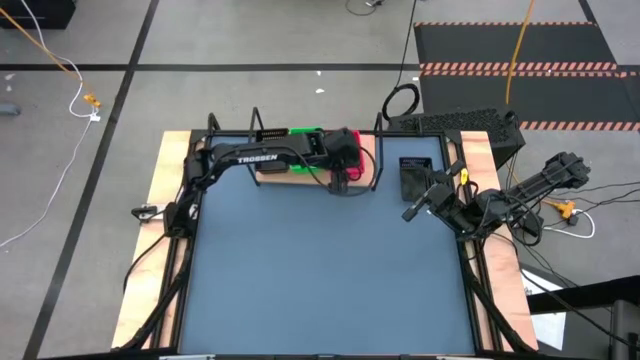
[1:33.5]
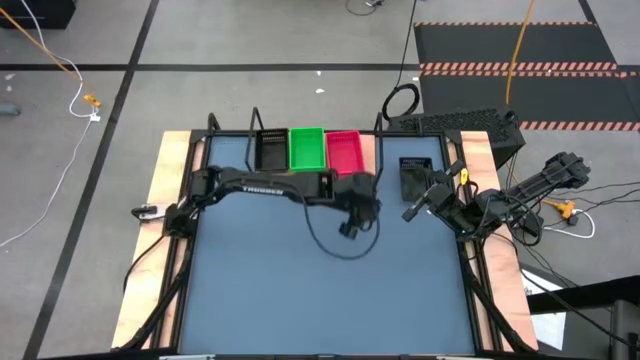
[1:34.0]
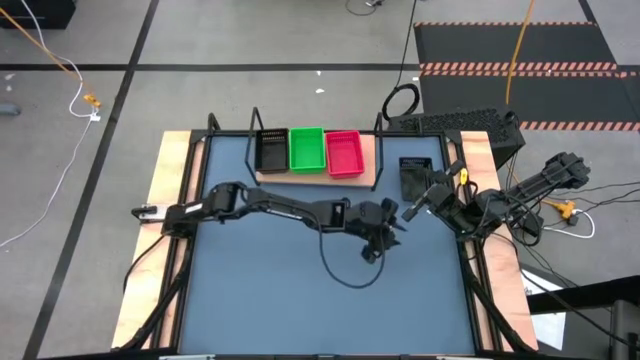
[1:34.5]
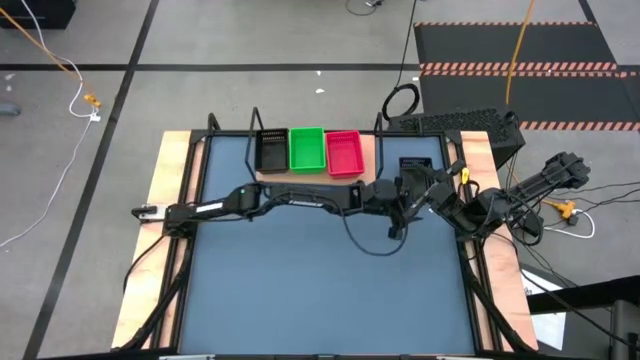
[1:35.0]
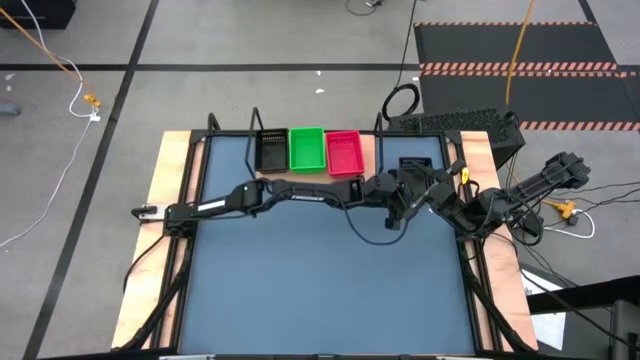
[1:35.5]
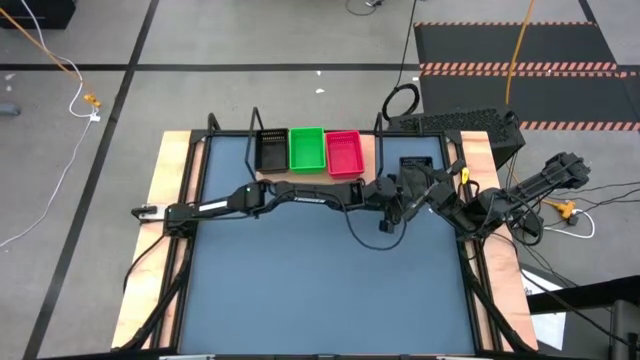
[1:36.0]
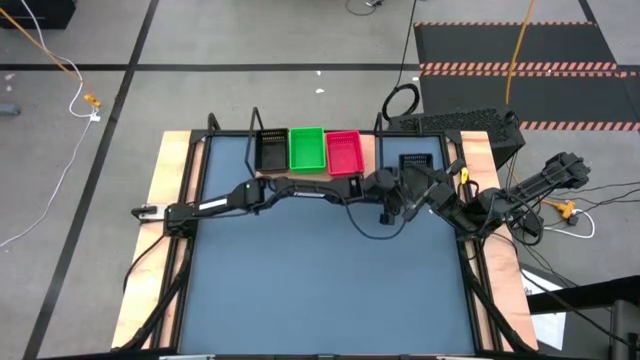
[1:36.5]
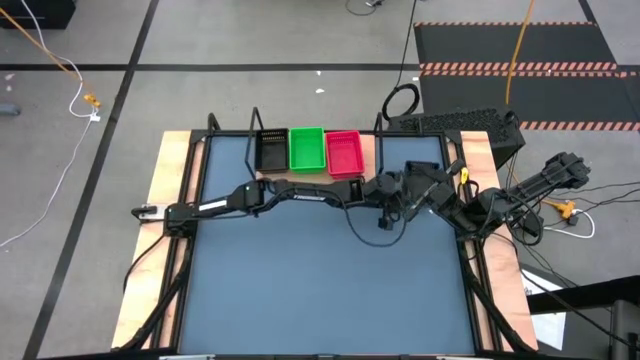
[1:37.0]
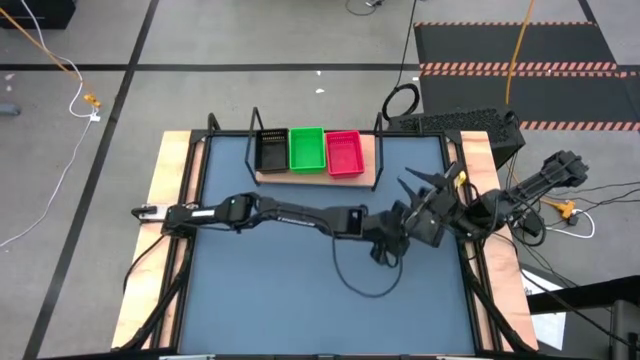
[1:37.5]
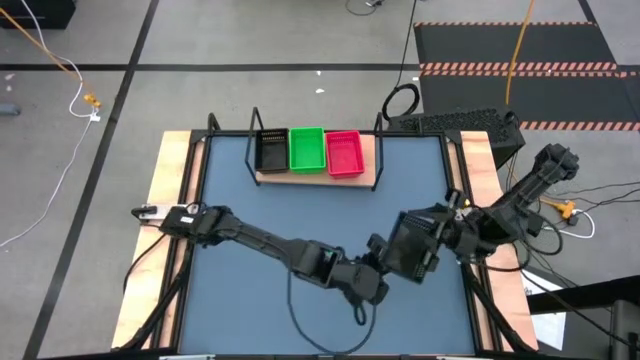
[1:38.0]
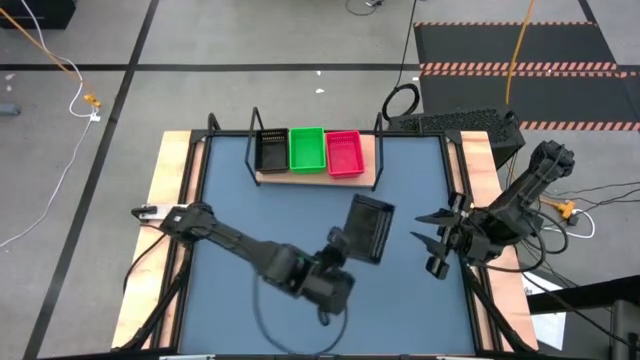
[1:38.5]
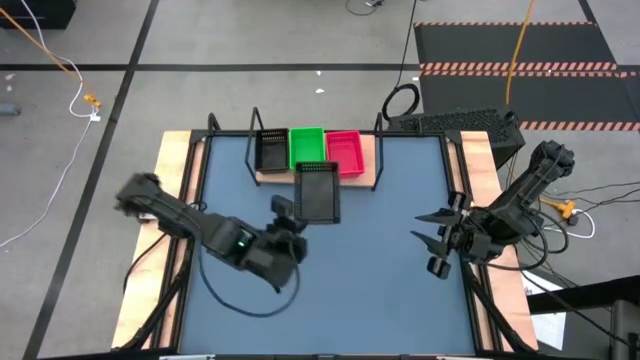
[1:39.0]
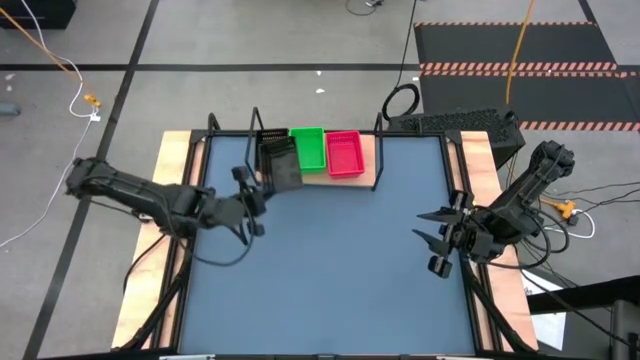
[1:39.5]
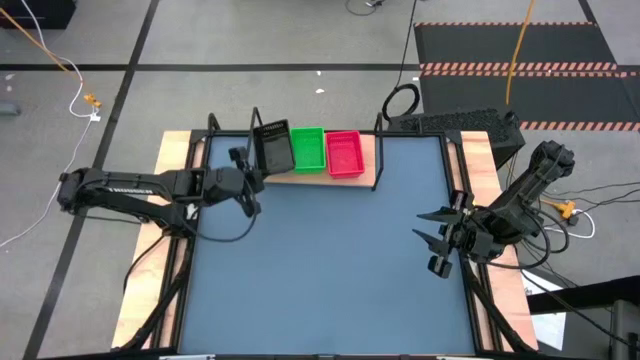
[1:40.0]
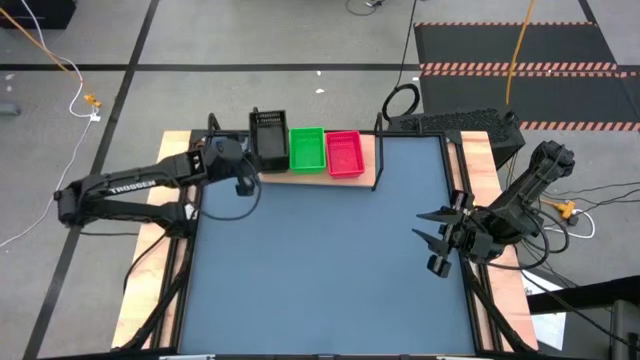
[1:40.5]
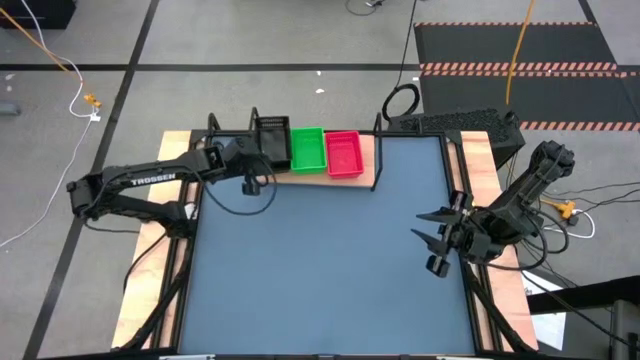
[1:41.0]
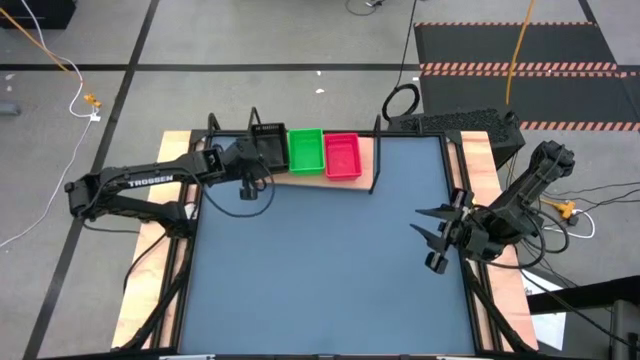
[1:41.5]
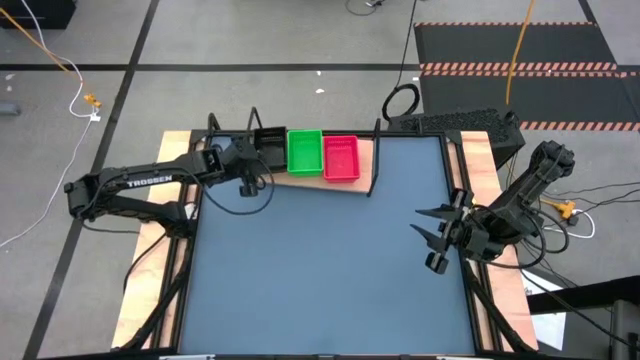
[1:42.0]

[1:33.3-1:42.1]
Task: Stack baskets on shelf by color
Stack the black bin on top of the black bins on the shelf

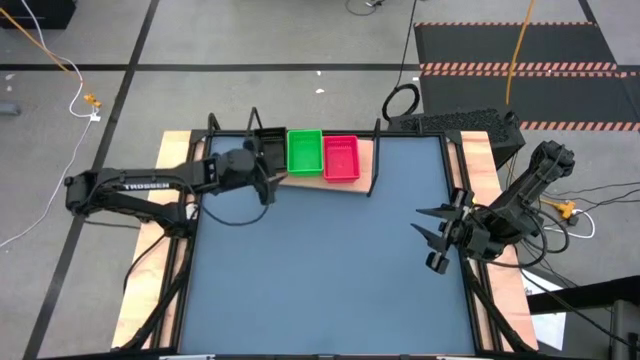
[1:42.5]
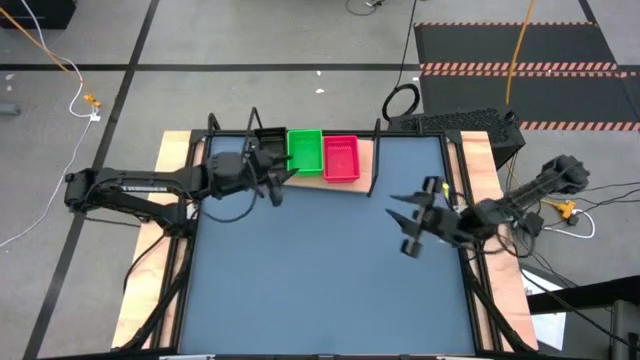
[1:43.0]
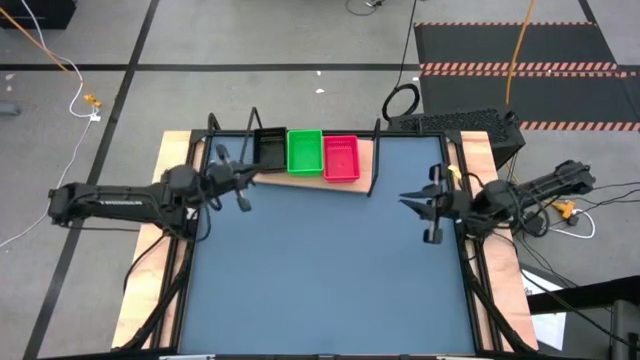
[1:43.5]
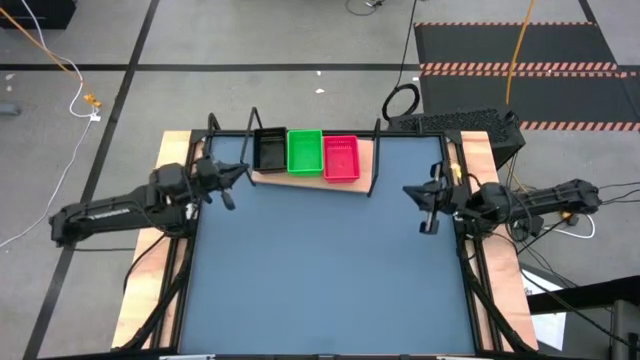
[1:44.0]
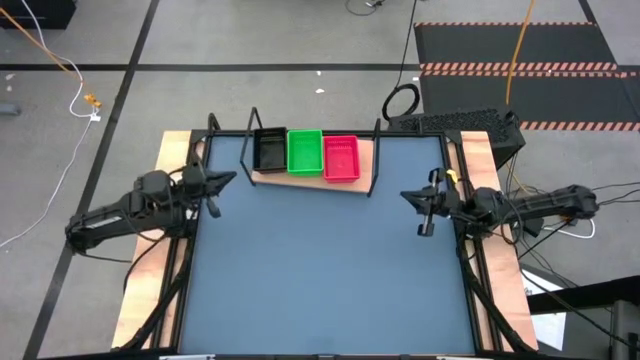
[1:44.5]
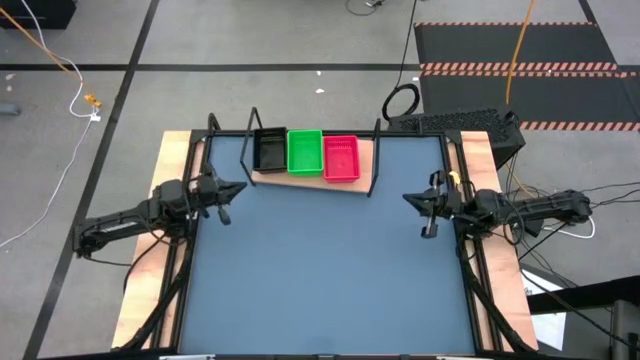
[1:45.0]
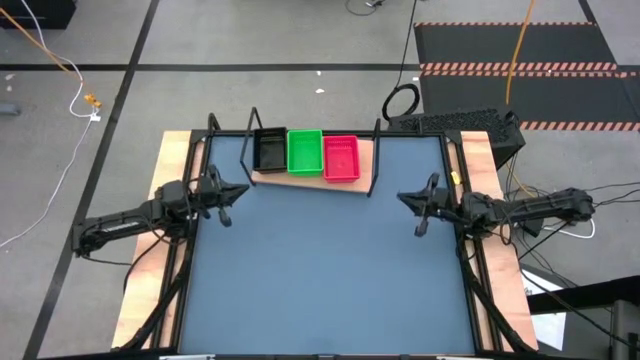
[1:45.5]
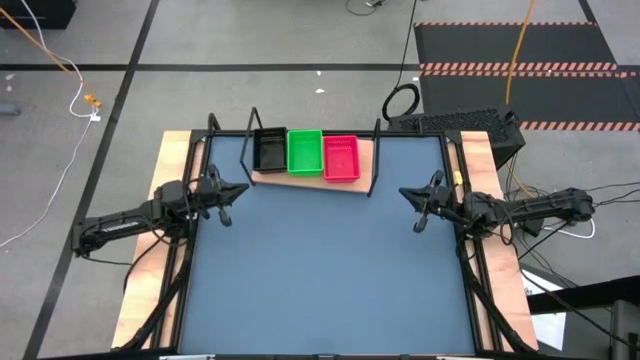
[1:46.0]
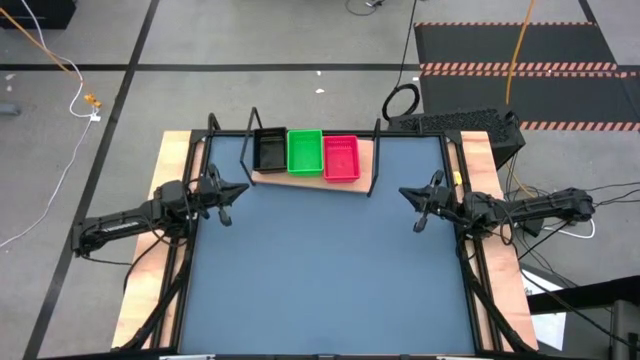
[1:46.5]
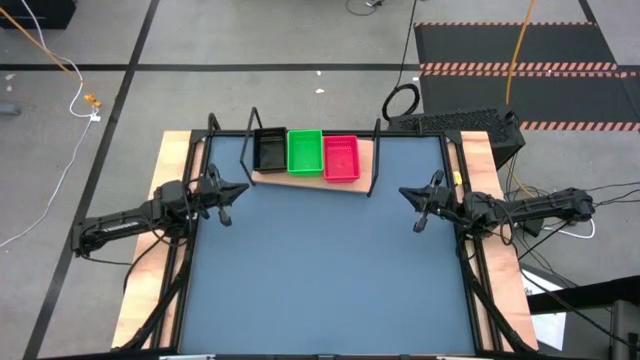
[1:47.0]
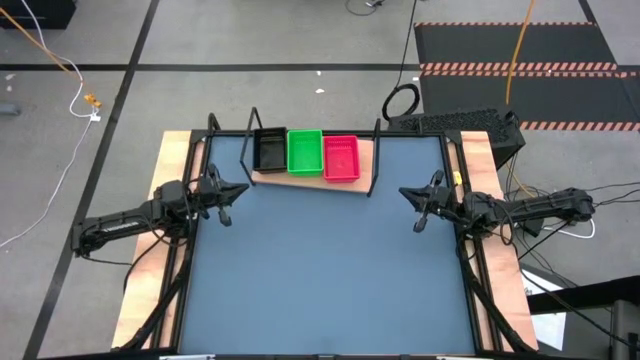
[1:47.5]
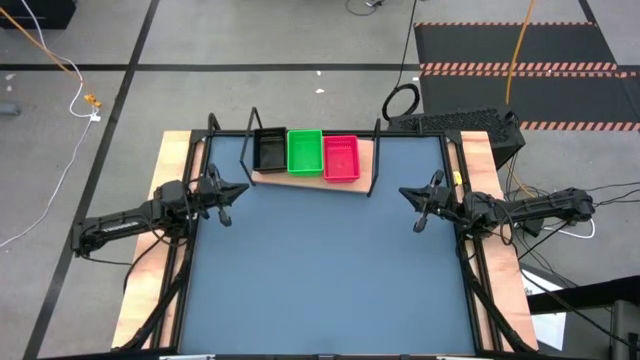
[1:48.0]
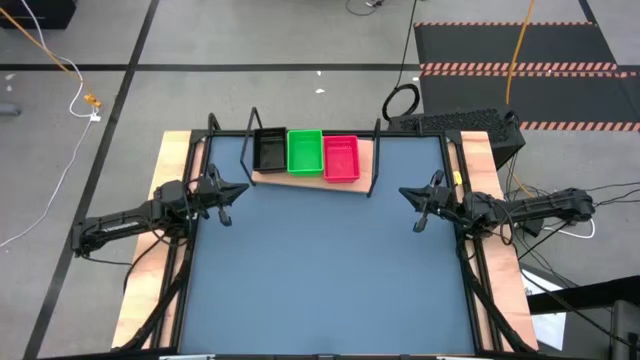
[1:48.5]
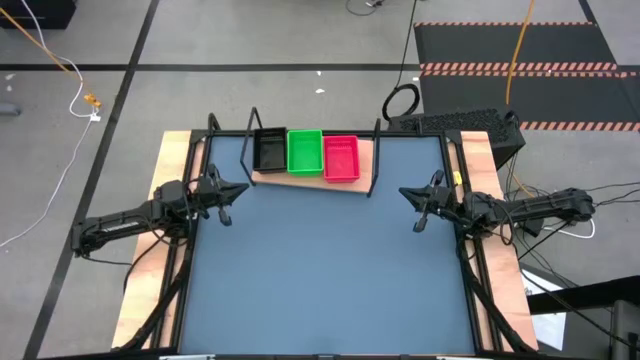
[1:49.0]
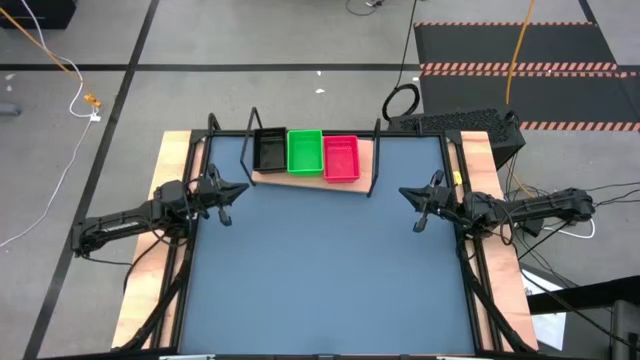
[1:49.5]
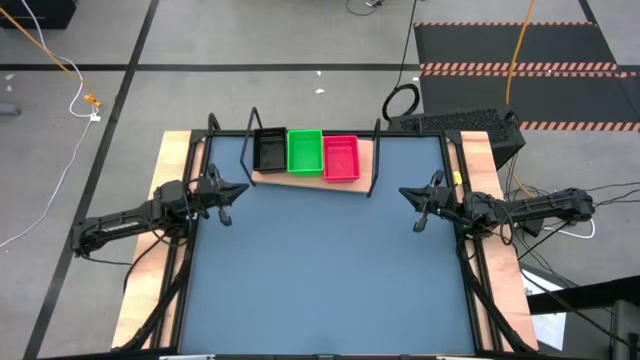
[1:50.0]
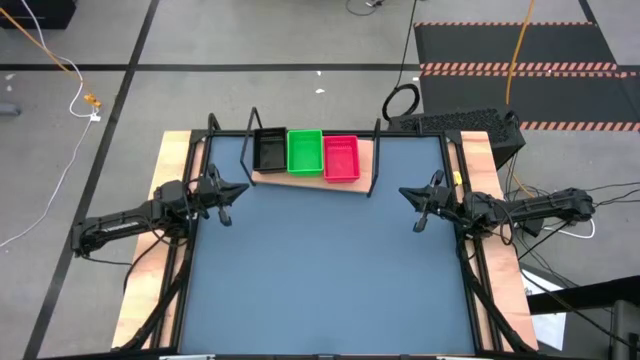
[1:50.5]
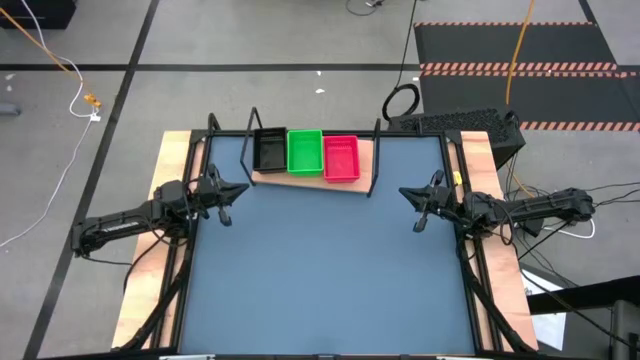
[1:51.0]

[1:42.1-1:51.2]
Return to Home Position

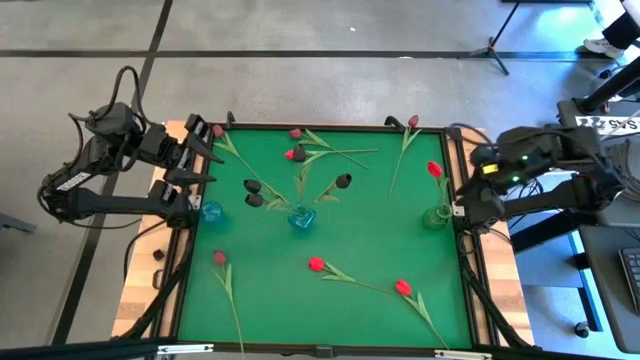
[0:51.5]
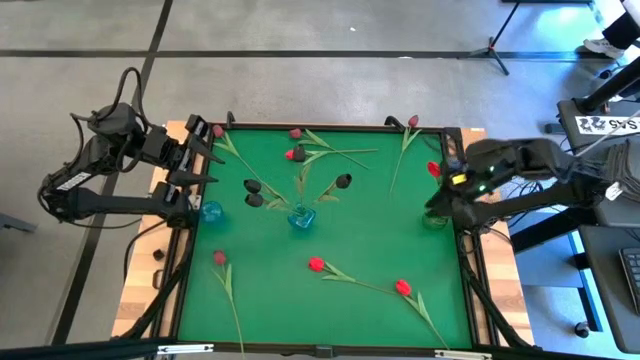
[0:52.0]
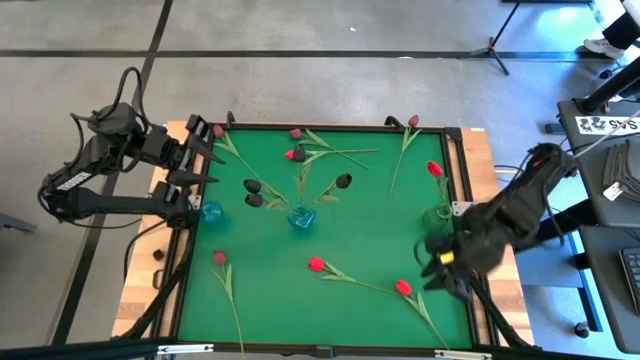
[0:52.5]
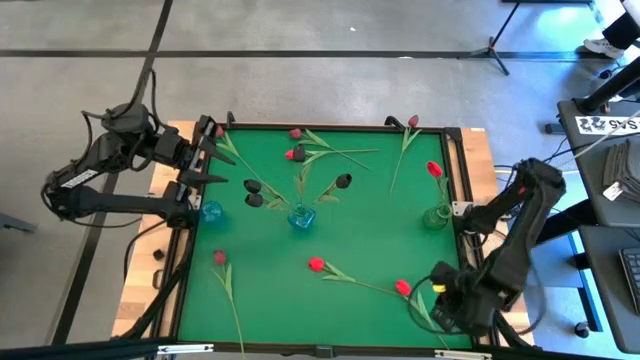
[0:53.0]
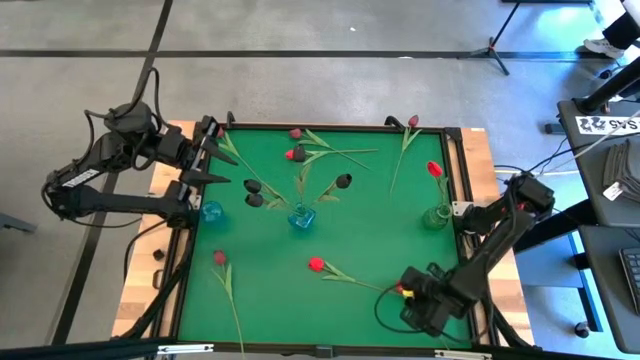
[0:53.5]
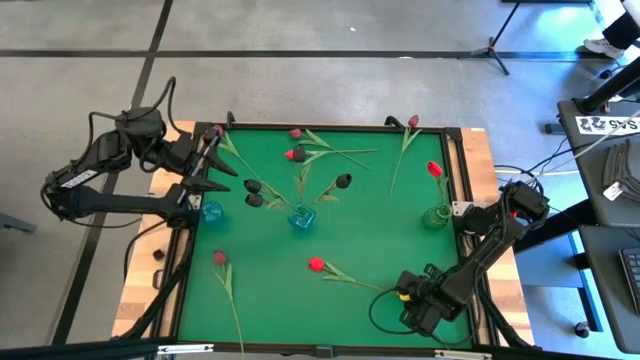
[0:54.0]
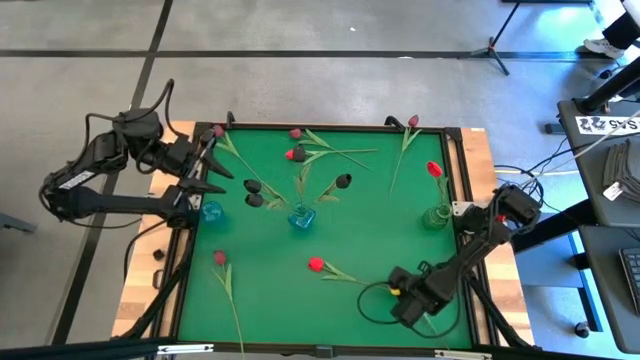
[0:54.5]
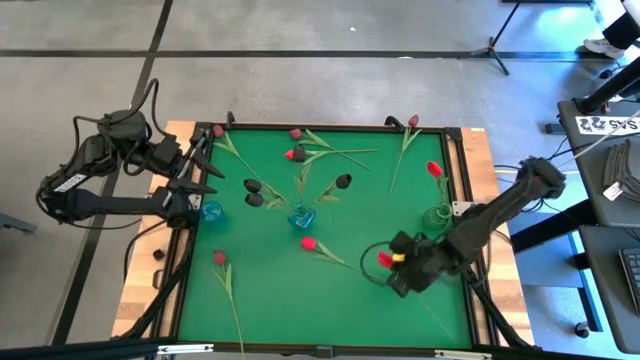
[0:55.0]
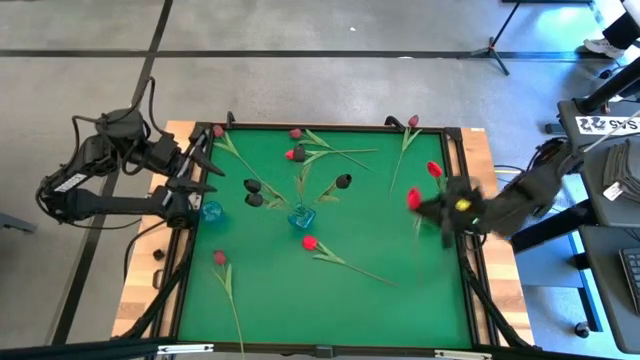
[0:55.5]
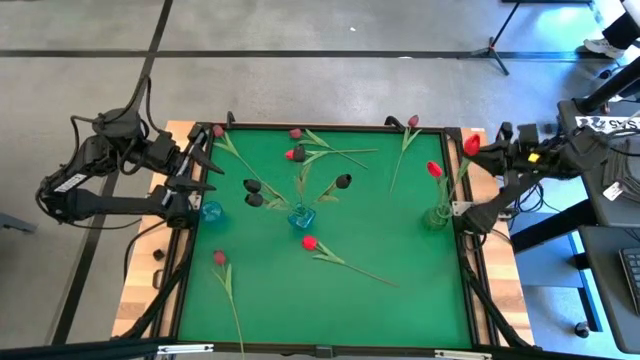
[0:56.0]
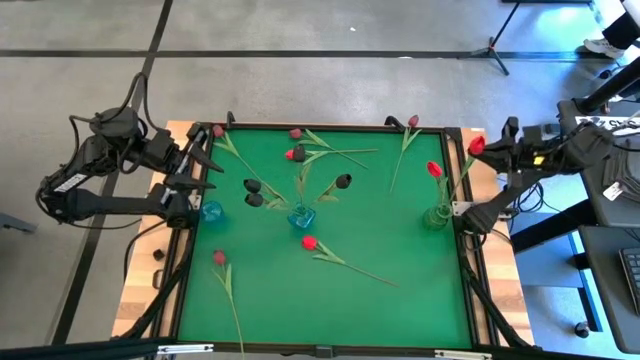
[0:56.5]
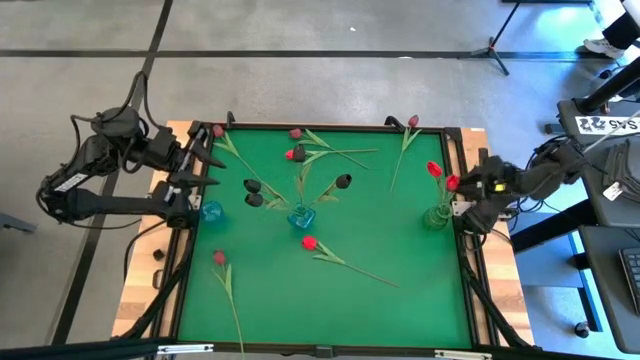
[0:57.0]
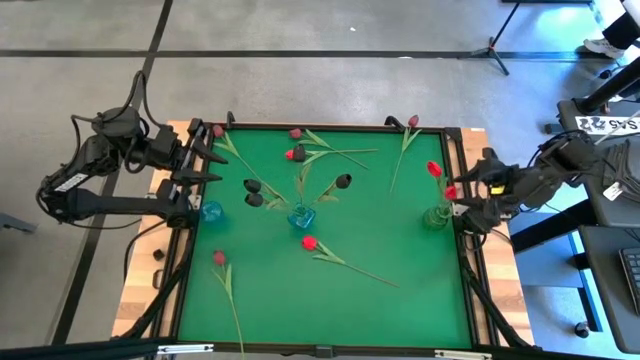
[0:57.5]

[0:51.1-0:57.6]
Task: Sort flowers into vase by color
Put the right red tulip into the green vase
